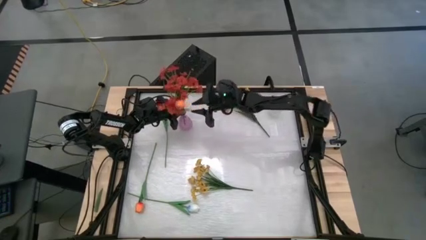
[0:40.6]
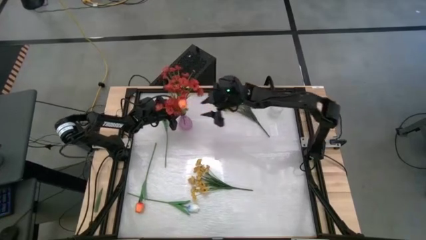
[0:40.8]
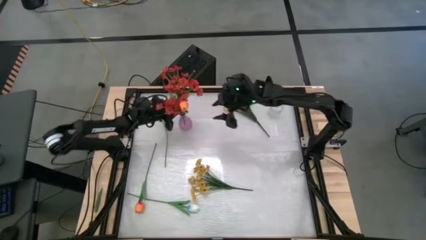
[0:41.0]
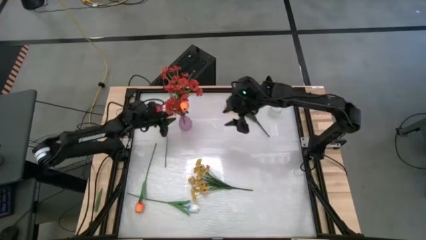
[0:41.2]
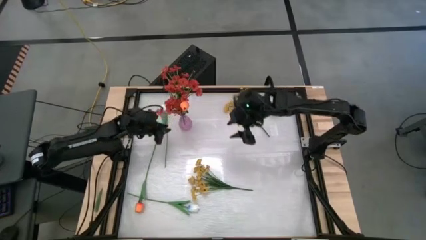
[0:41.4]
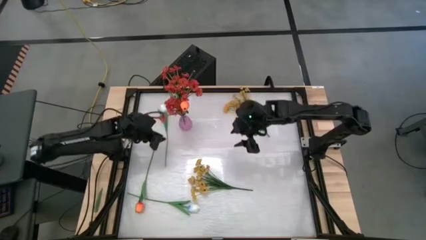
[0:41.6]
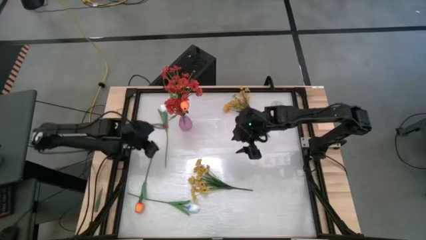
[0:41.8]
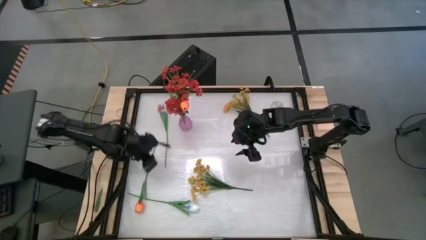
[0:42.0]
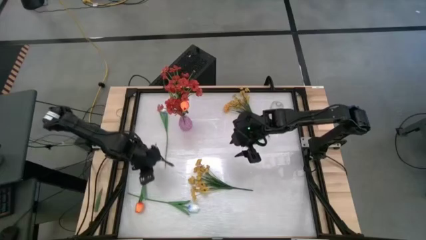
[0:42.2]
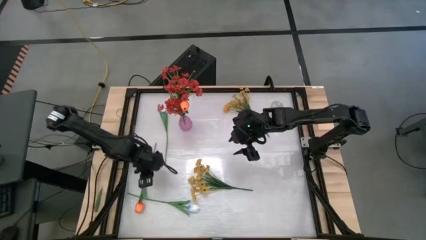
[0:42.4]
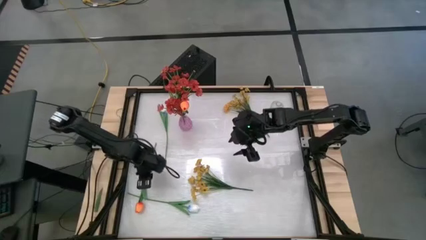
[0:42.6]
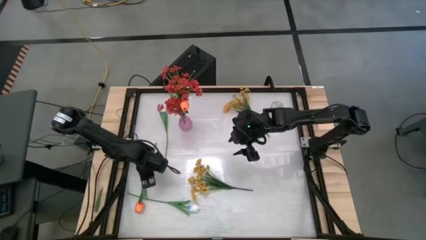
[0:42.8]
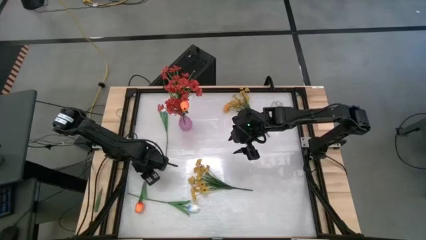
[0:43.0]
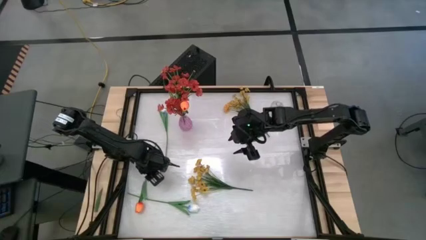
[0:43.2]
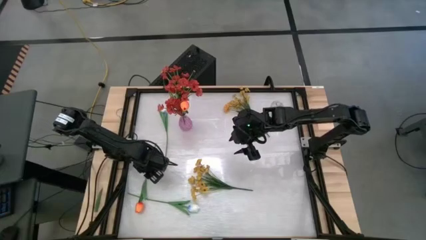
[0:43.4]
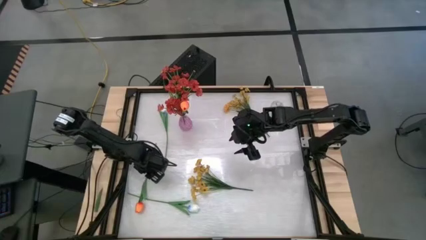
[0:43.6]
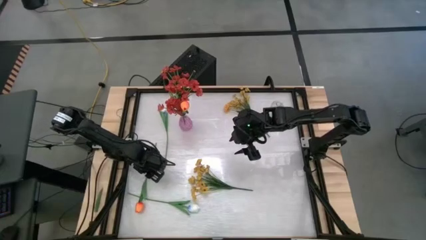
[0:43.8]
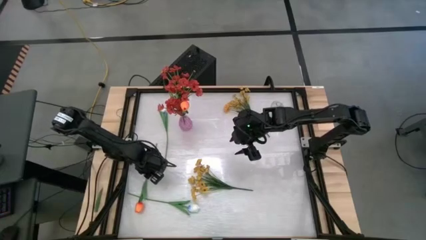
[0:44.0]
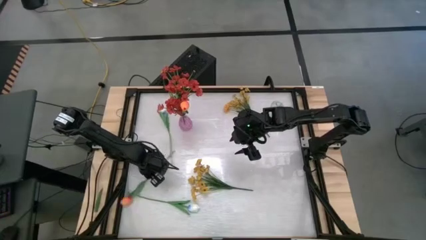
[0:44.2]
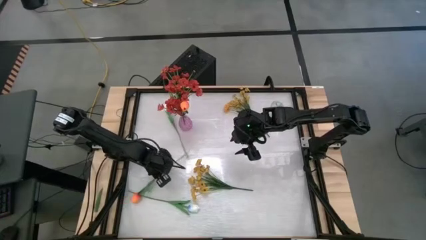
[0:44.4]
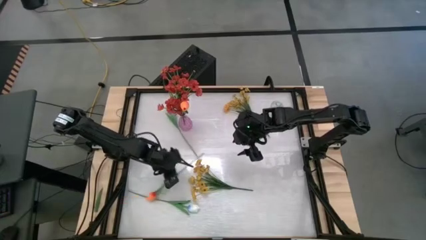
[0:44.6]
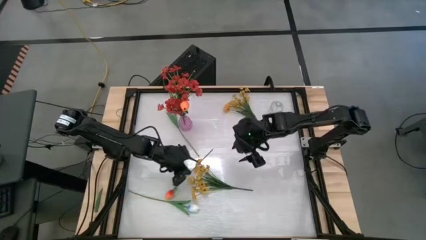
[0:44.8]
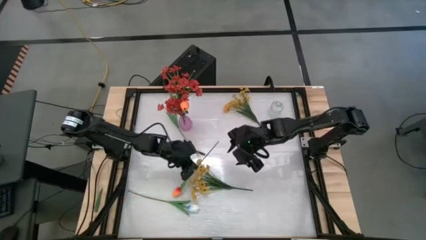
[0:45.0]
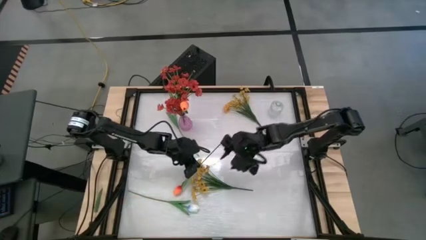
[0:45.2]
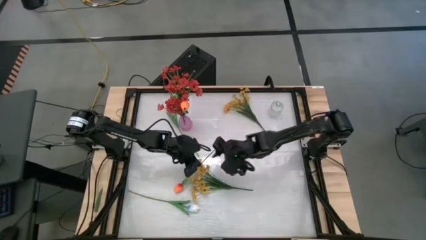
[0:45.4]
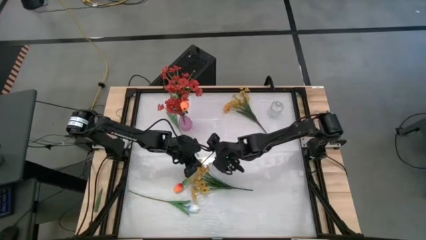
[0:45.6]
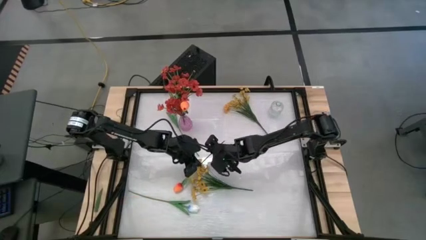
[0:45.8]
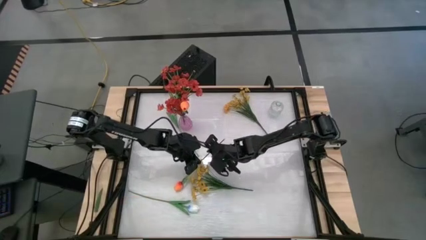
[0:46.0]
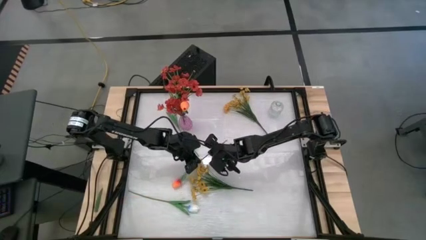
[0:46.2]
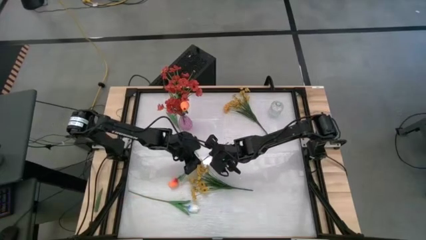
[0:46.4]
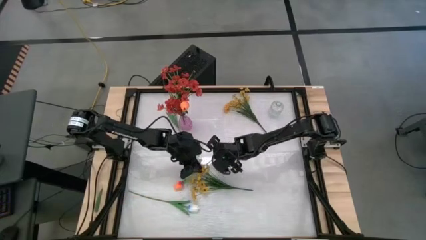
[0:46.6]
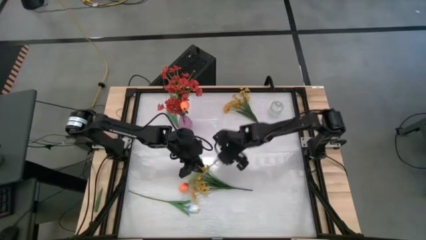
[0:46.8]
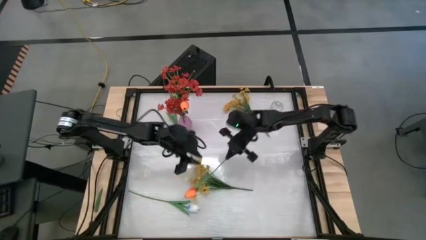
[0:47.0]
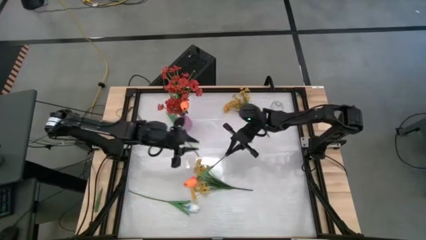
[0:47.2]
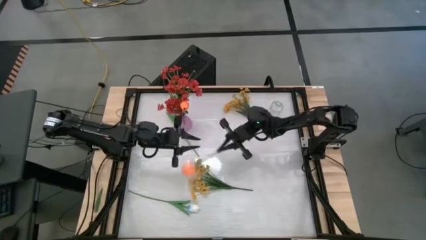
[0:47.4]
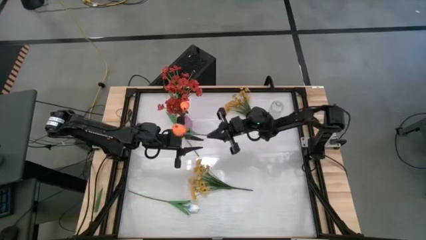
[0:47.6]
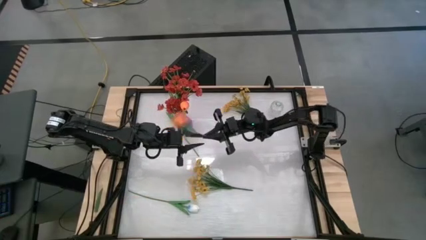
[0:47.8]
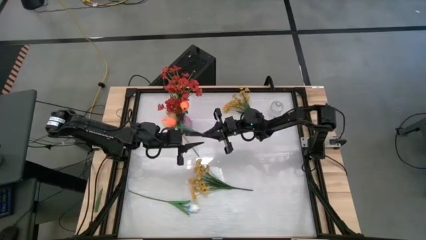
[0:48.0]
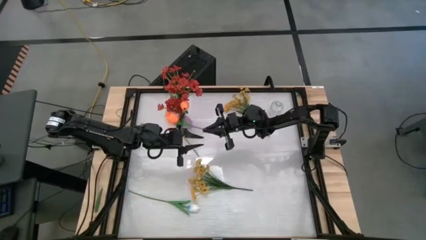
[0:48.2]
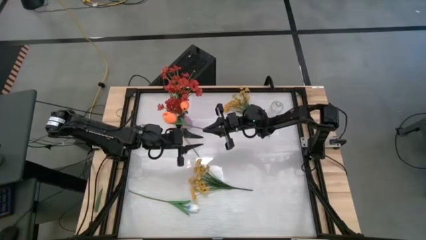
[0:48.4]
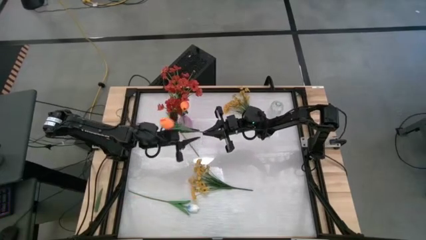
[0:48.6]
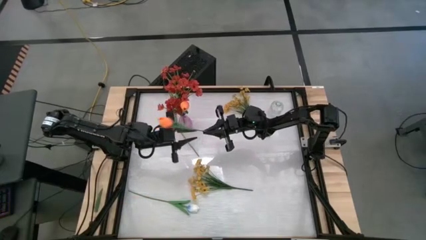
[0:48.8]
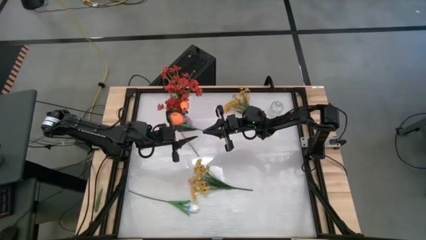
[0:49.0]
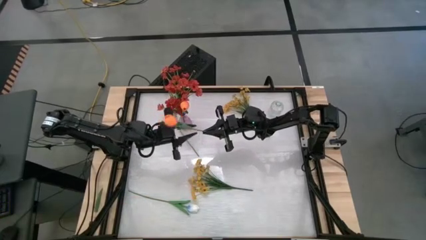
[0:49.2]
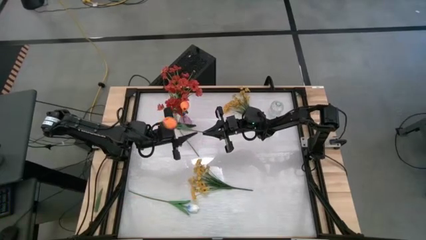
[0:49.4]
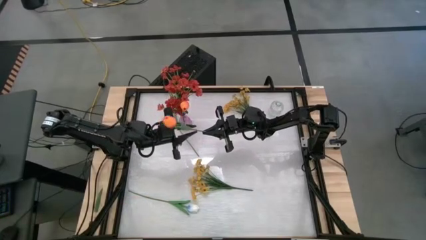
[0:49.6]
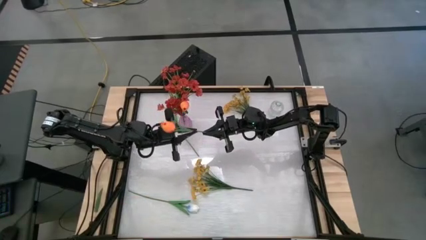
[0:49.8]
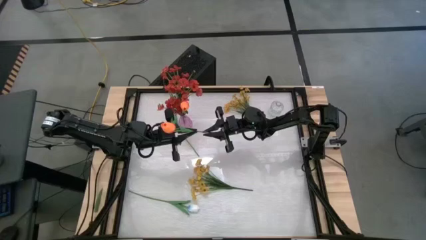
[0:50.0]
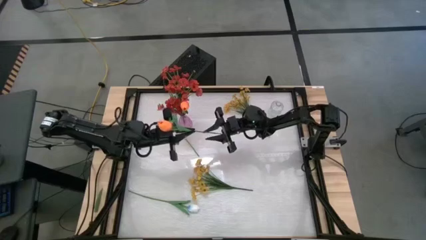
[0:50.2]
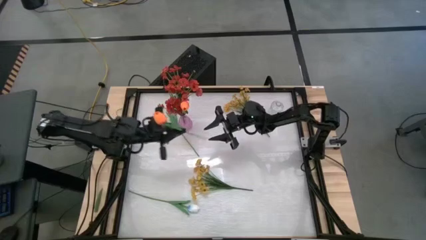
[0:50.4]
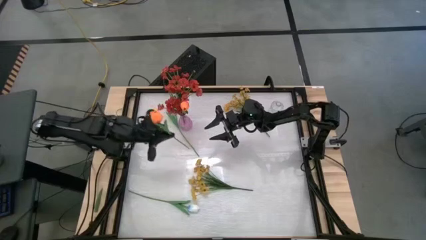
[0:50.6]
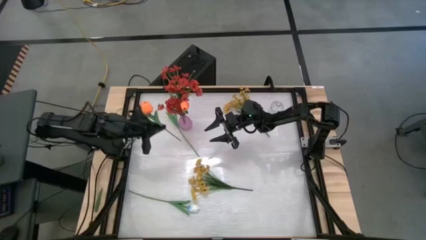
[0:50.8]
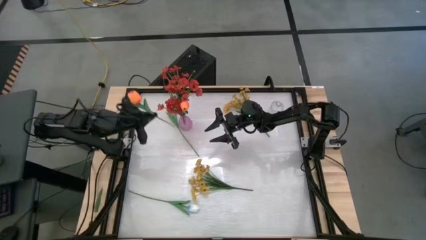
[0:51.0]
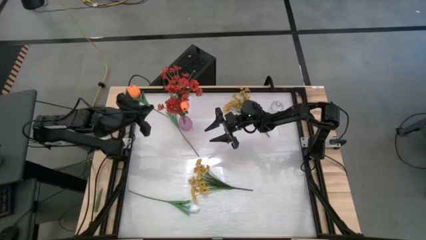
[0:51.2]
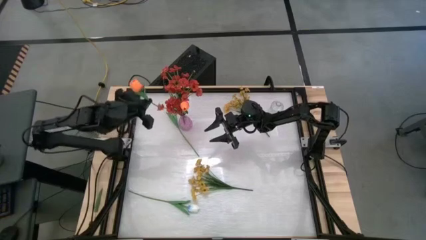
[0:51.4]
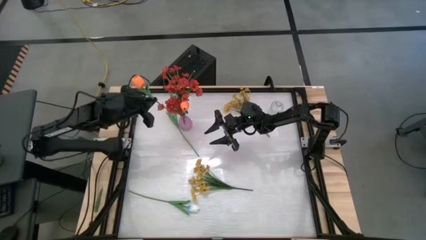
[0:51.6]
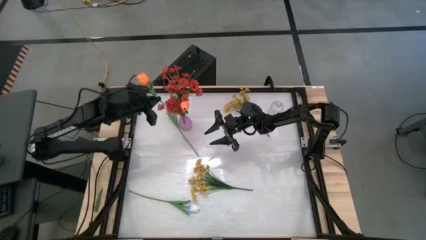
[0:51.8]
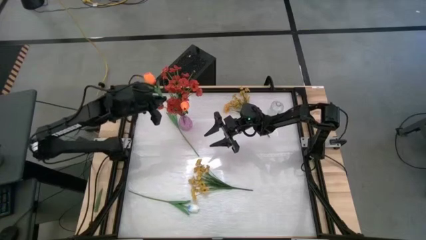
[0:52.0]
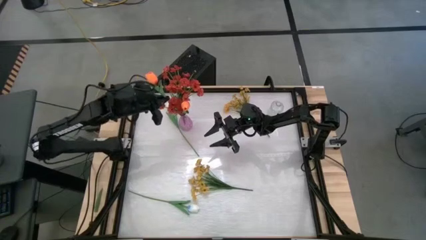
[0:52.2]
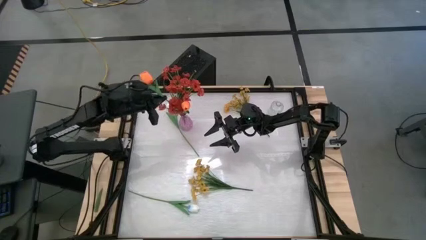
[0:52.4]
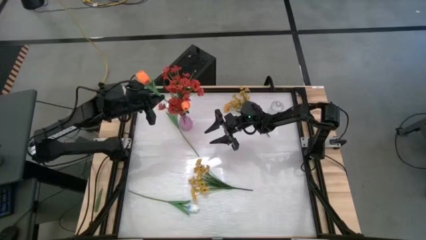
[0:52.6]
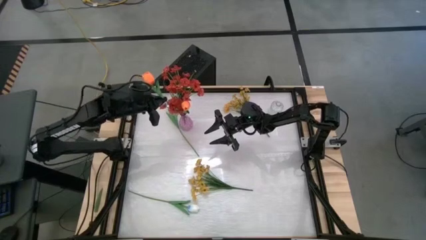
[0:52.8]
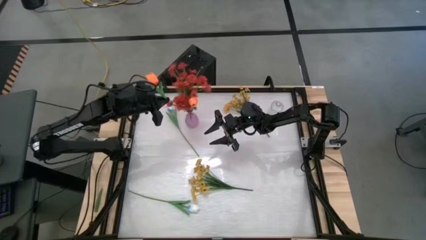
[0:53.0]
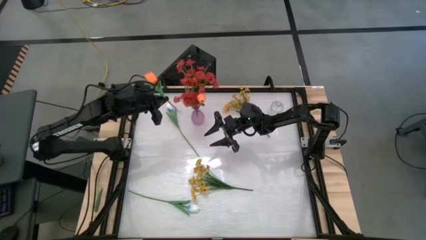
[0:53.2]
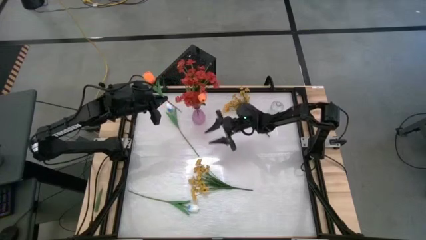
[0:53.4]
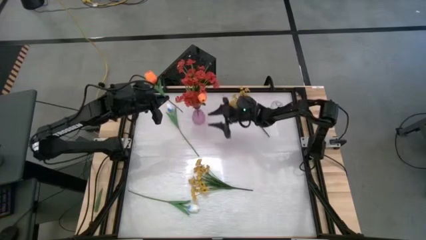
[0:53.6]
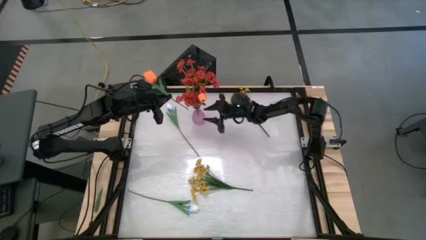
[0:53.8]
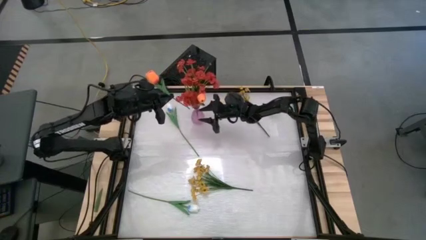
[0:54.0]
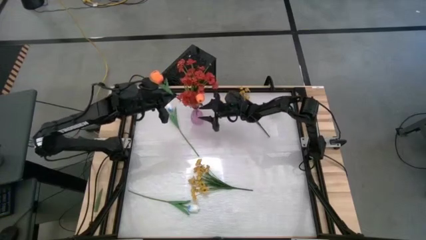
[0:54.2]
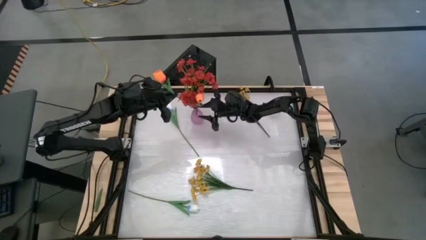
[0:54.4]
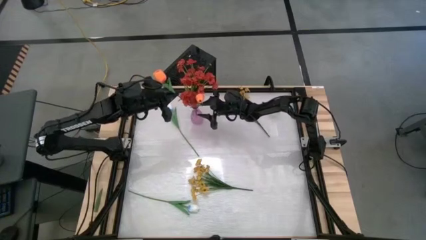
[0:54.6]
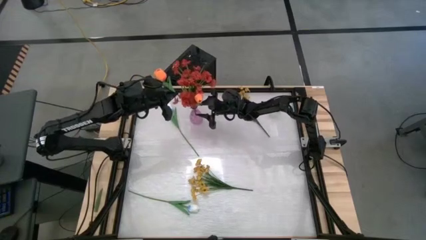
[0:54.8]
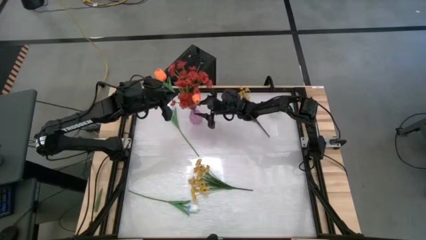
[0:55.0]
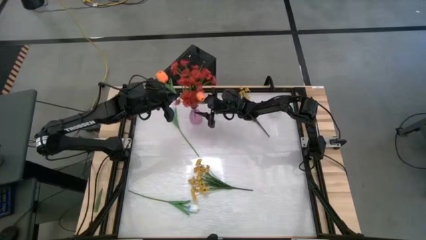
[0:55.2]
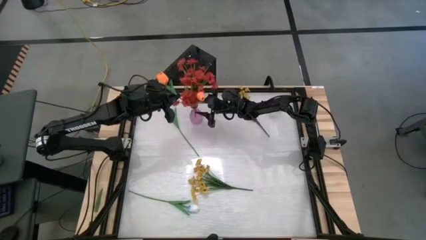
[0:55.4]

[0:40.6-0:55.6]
Task: Sort flowers into vase by color
Put the orange tulip into the pink vase
